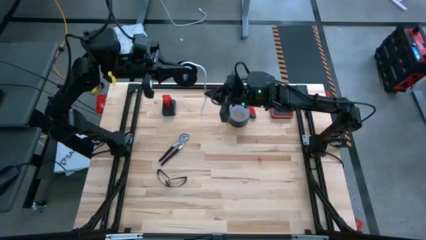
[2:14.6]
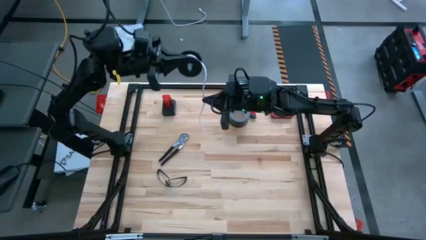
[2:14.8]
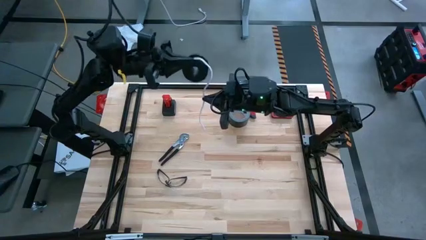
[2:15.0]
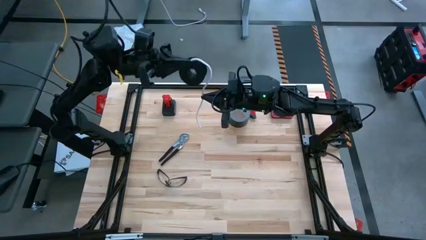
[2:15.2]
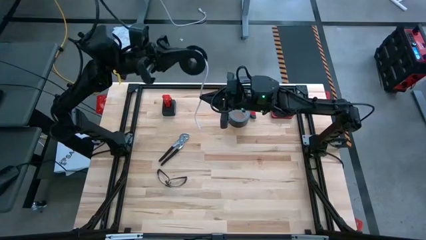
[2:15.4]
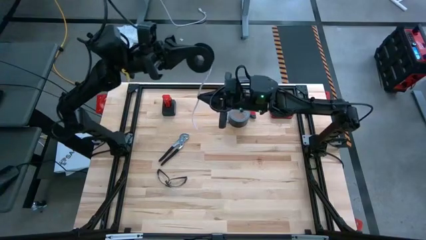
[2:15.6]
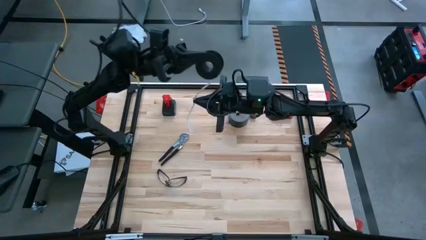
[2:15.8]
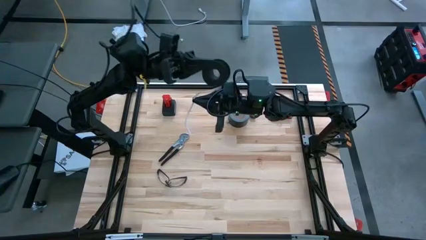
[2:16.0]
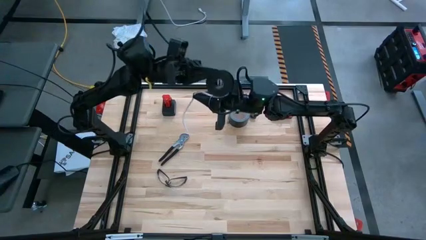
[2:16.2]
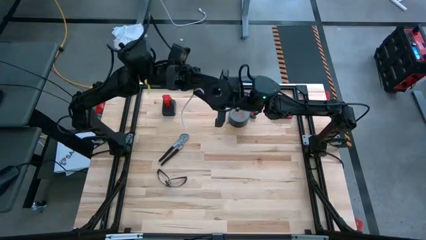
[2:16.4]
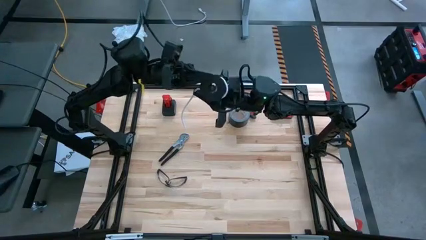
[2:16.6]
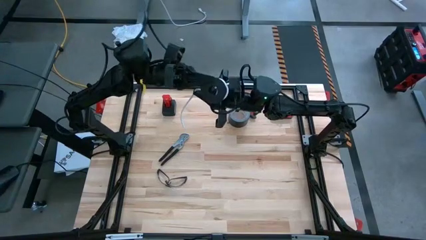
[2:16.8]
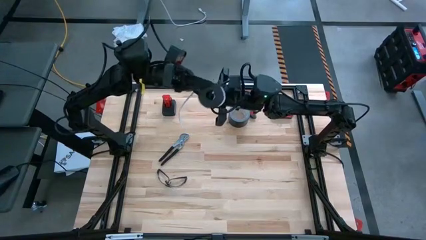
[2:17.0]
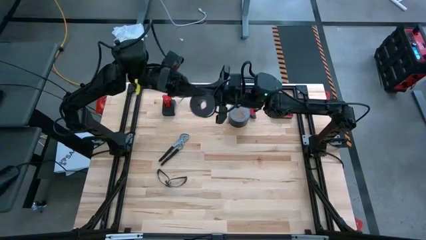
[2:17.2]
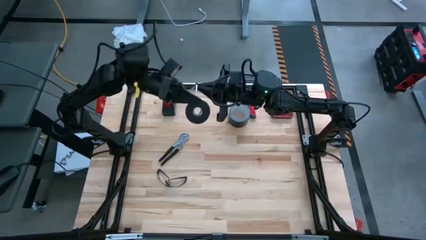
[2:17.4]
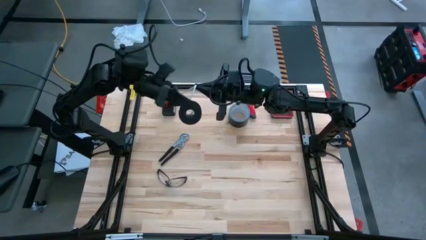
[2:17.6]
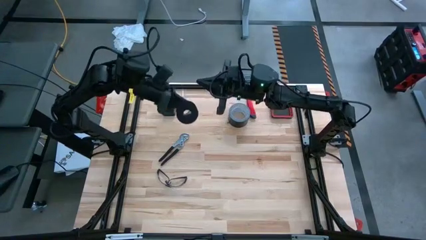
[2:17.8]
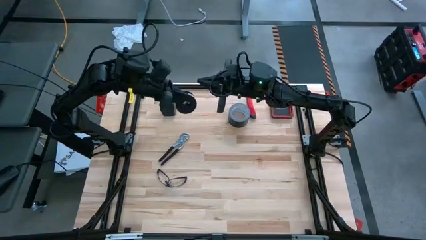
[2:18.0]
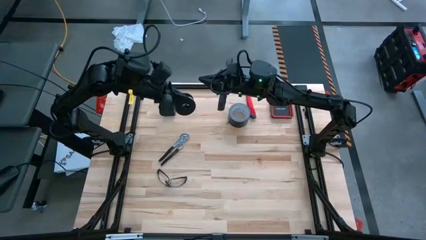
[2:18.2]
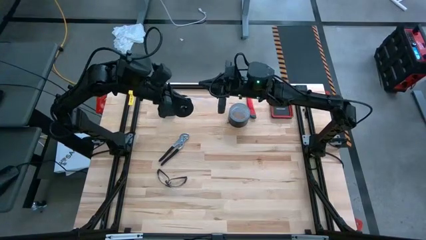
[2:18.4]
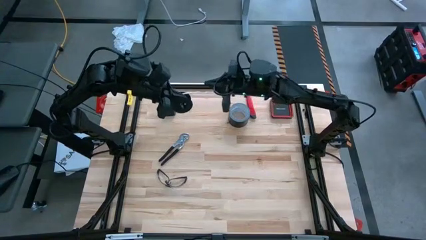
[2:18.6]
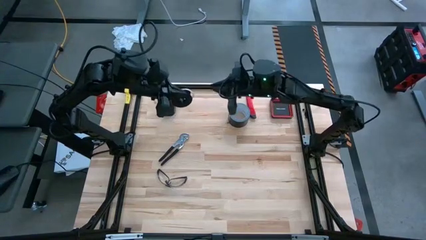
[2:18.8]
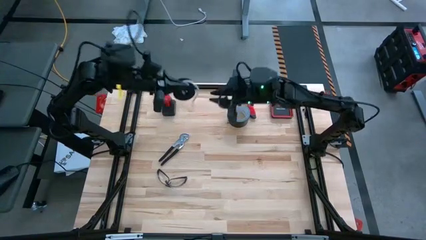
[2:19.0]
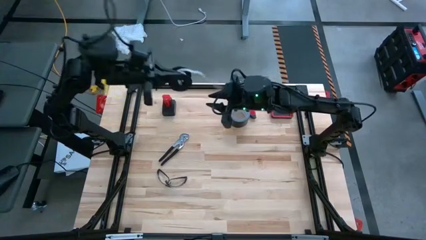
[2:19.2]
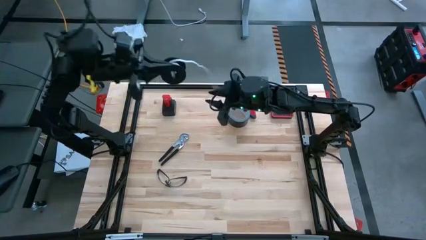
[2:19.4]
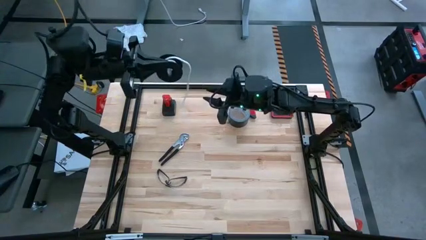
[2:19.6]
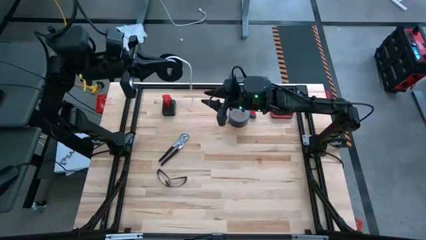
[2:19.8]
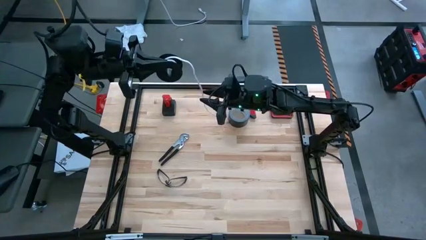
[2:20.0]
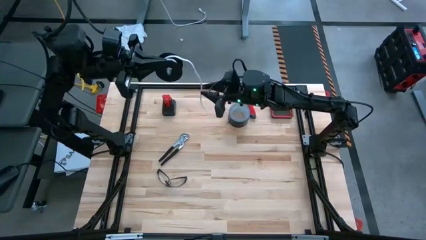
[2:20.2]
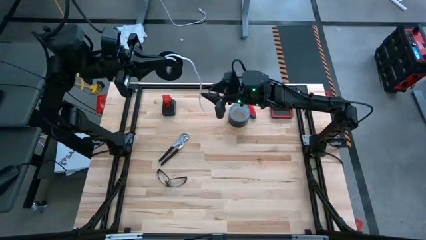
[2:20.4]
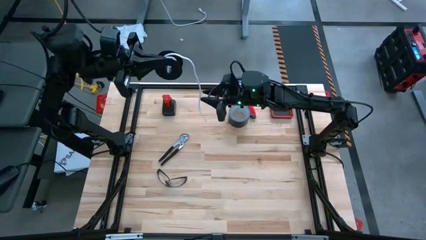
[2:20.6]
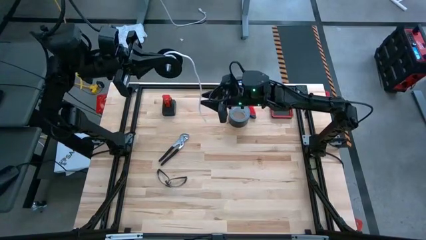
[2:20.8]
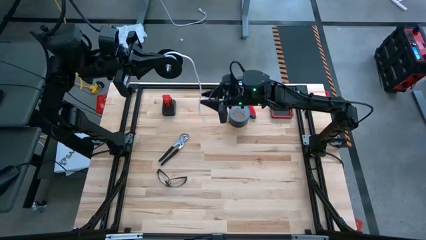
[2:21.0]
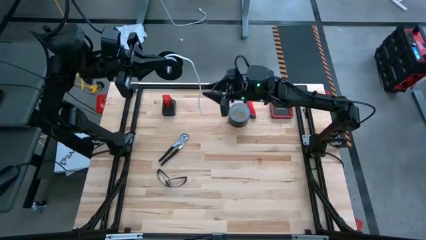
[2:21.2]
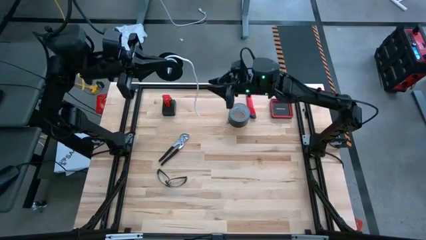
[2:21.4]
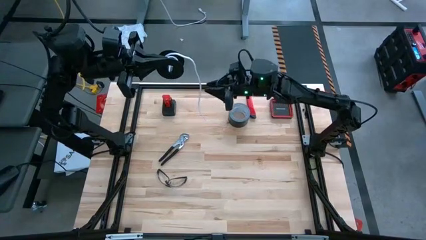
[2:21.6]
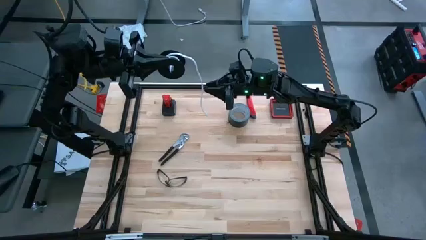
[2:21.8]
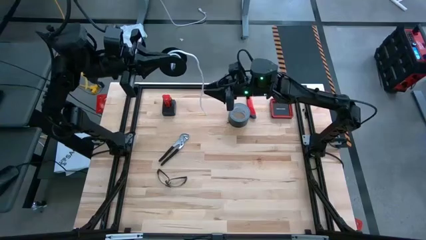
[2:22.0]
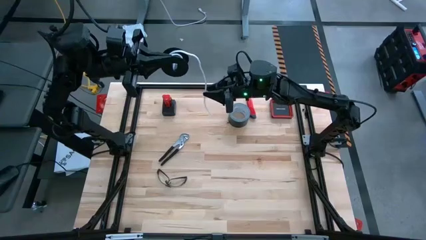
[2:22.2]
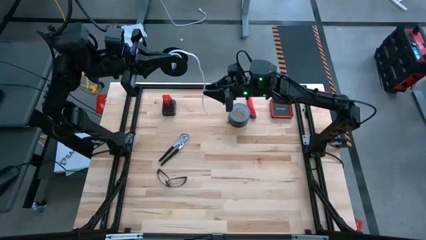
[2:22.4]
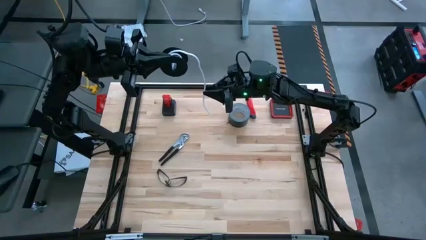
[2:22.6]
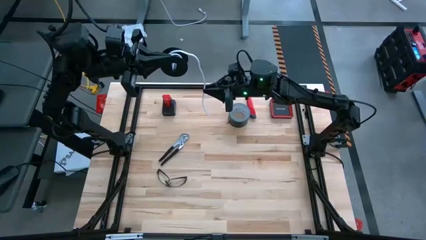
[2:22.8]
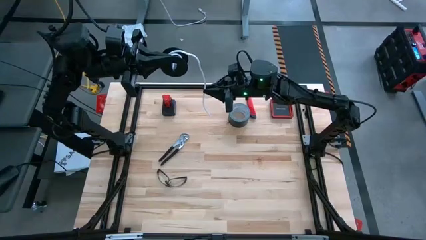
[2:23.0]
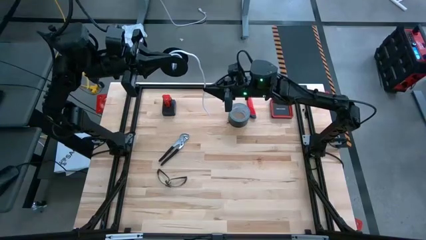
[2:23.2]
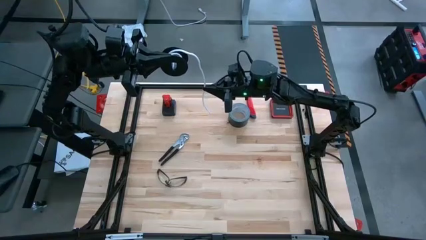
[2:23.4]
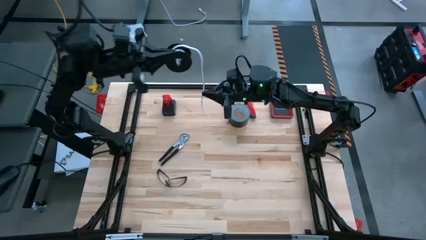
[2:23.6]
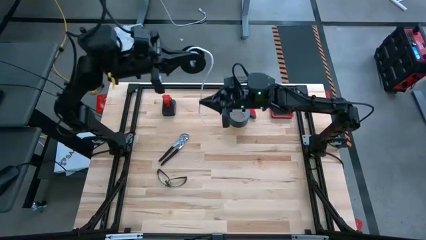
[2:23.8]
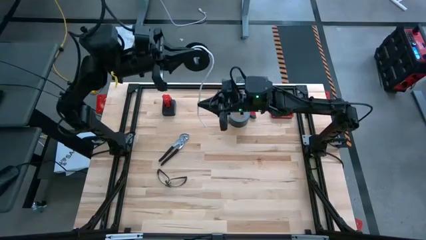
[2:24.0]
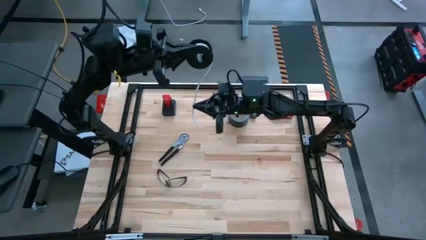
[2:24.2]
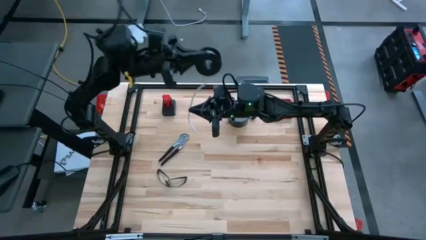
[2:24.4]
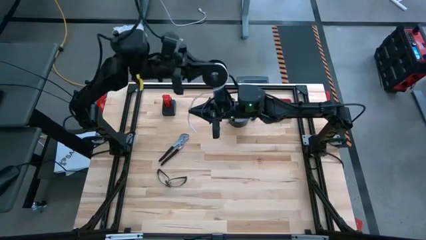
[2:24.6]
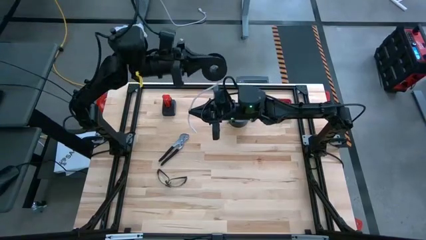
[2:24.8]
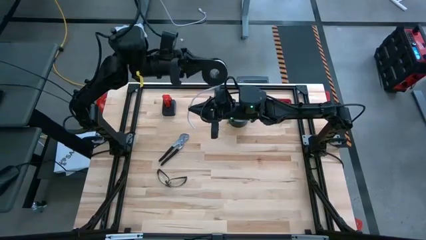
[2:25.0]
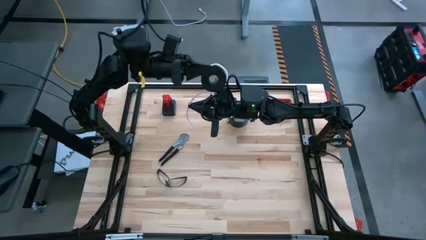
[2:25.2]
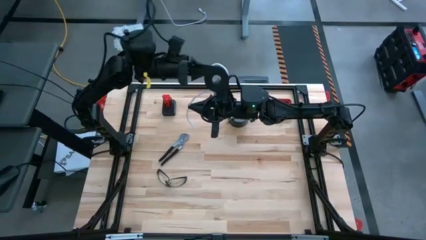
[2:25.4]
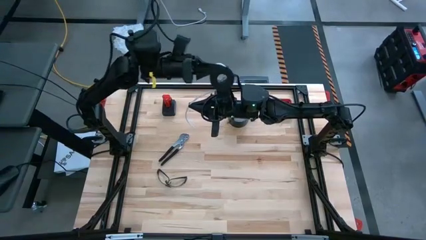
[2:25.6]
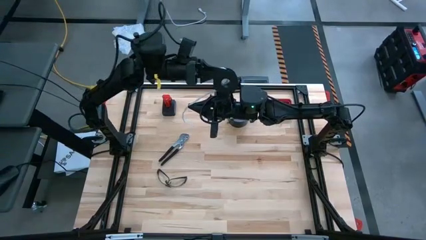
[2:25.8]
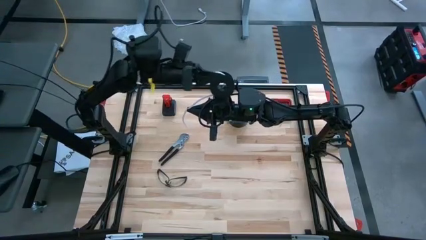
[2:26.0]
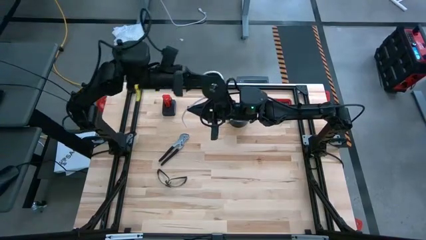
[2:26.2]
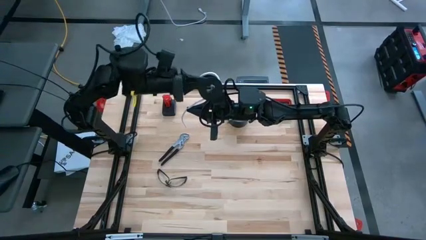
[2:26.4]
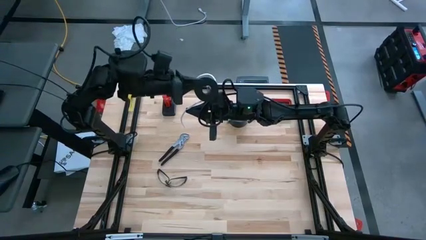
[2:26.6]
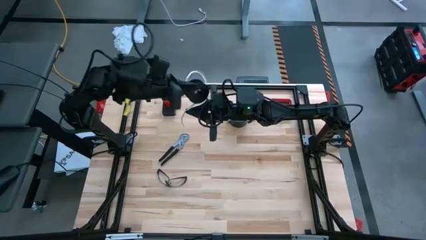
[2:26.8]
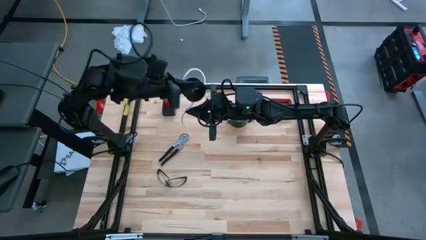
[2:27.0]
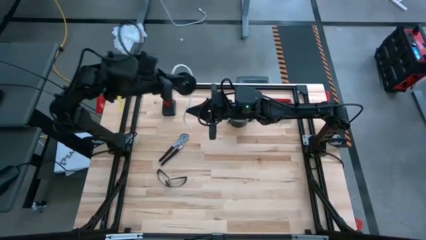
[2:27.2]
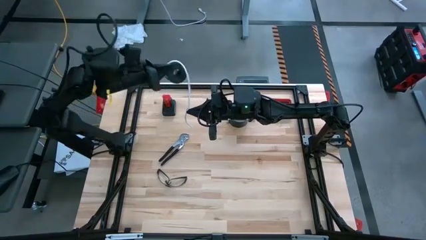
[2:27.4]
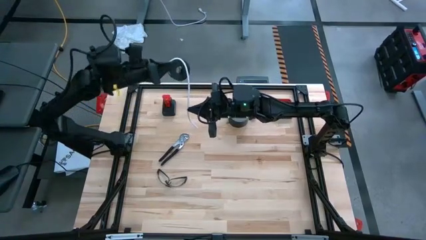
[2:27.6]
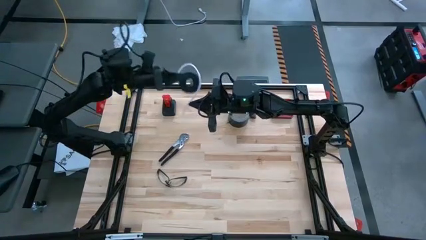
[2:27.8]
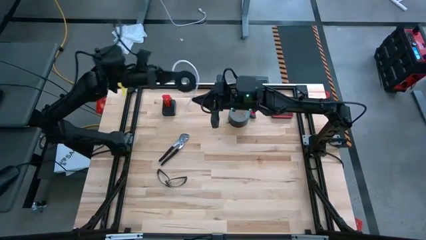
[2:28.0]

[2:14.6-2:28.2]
Task: Coil cords
Coil the white wire onto the black spool

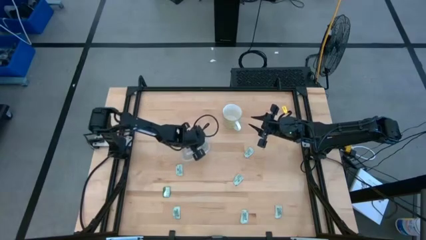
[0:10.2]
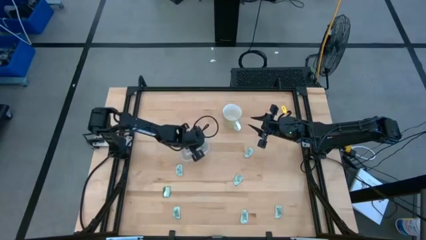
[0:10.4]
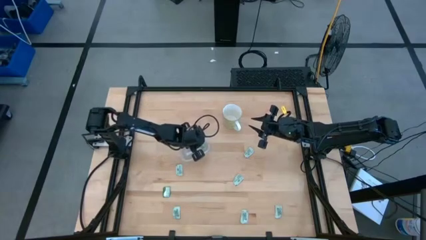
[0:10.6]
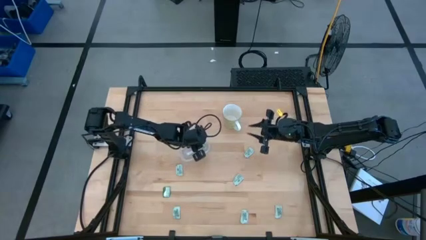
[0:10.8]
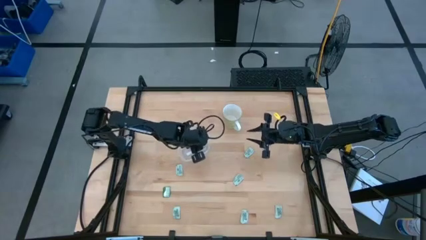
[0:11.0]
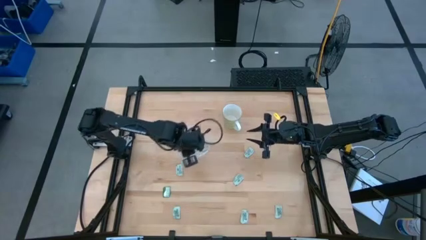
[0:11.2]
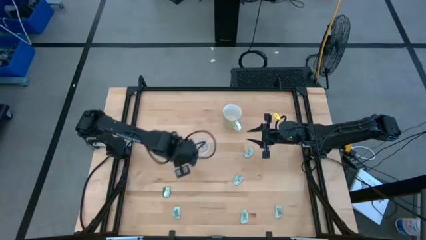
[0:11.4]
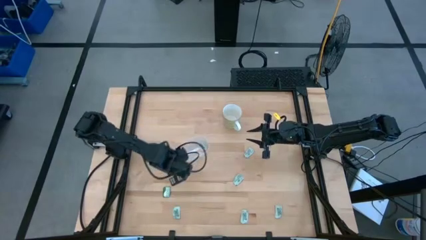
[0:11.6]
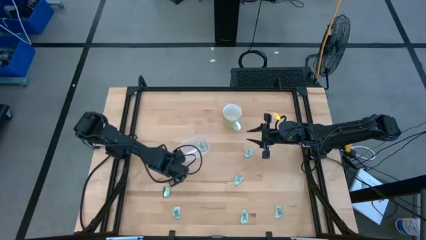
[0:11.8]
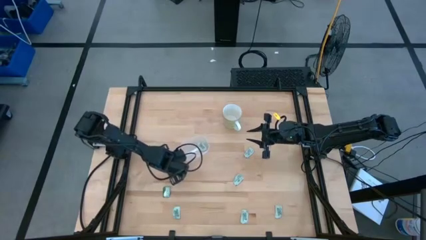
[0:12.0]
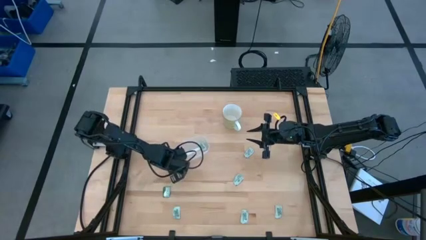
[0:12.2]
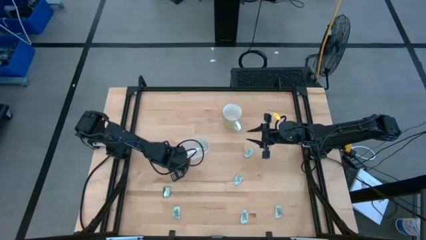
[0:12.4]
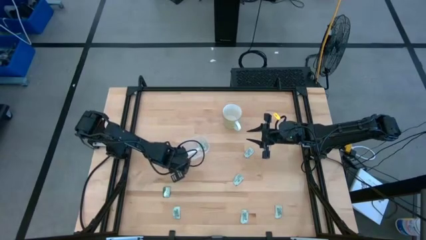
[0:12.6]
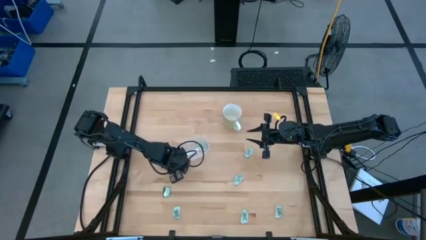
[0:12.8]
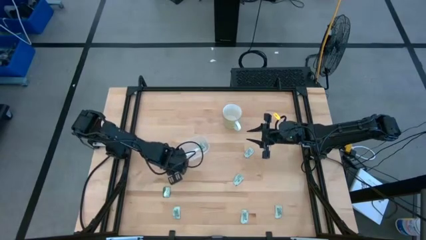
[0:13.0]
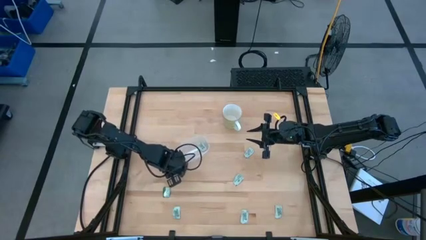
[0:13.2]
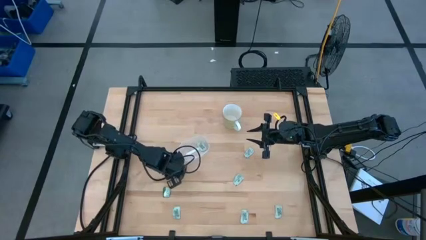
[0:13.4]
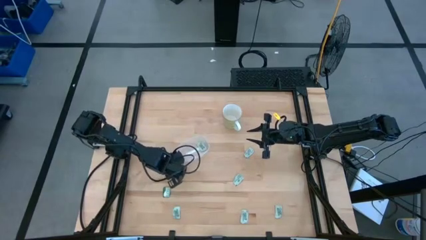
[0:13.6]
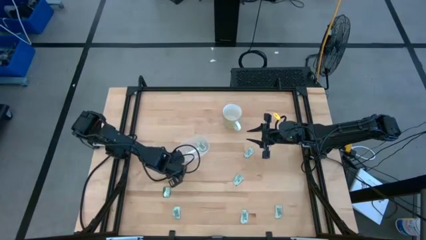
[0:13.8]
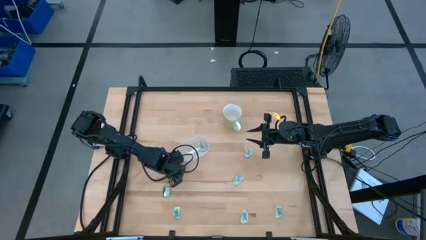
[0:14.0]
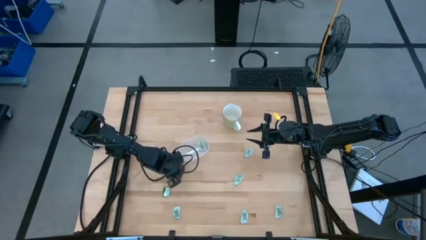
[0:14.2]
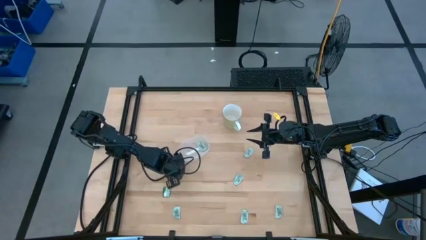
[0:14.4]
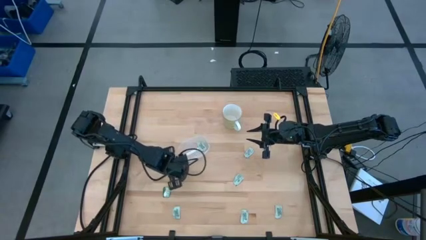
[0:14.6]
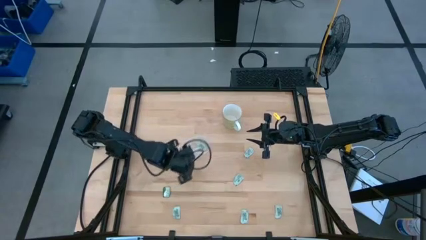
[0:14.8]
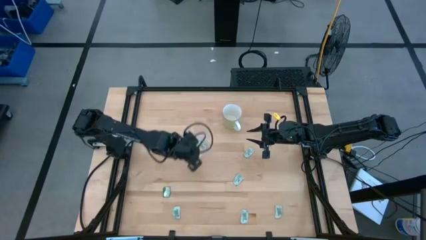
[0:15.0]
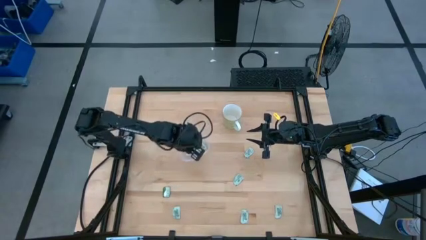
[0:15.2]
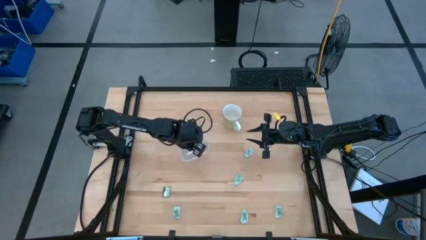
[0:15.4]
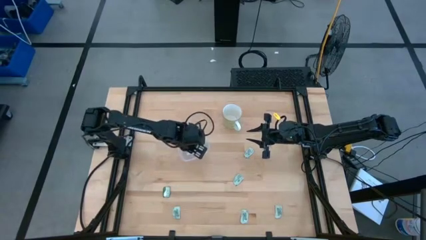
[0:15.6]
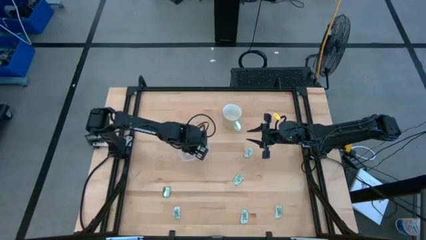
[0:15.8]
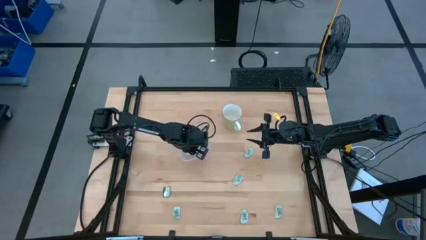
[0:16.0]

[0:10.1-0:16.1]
Task: Pick and place Stevia / Truvia into bins
Put the white stevia packet into the bin
